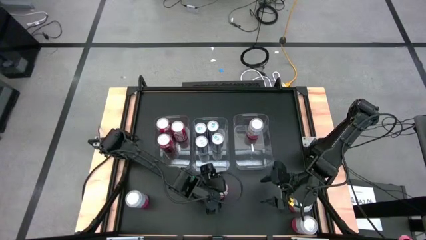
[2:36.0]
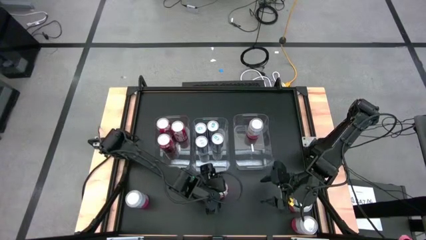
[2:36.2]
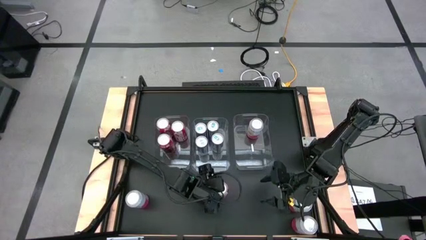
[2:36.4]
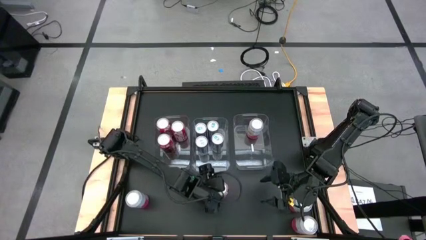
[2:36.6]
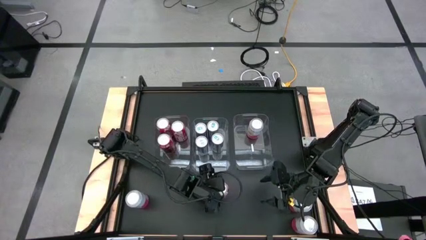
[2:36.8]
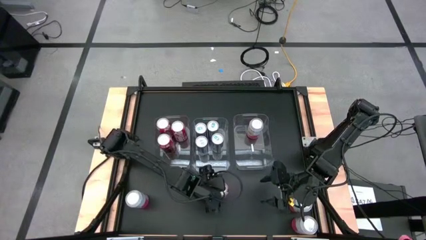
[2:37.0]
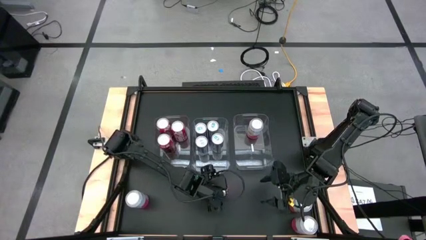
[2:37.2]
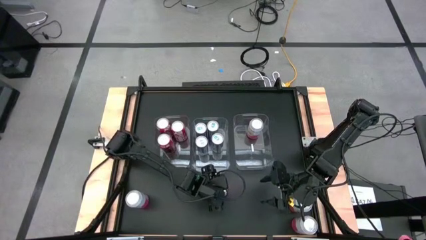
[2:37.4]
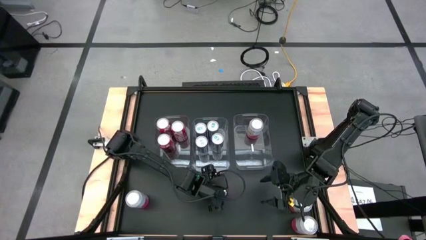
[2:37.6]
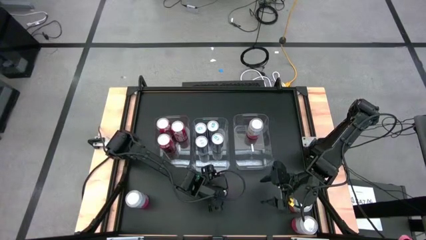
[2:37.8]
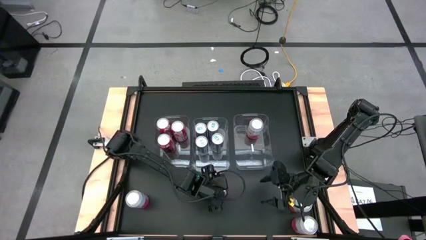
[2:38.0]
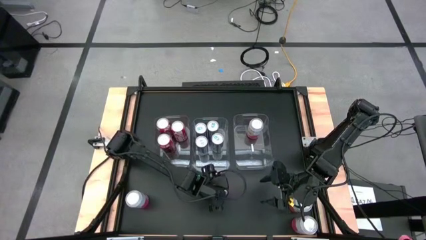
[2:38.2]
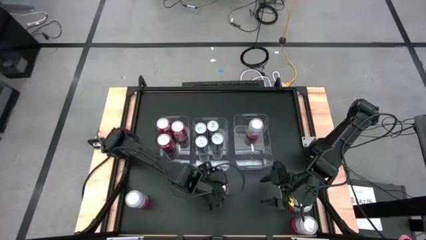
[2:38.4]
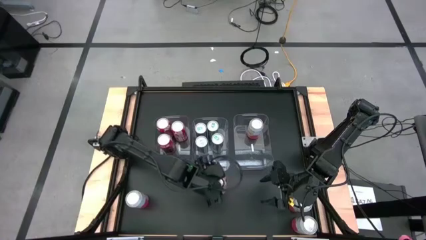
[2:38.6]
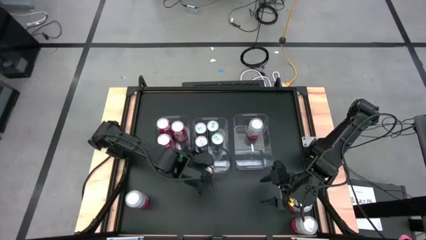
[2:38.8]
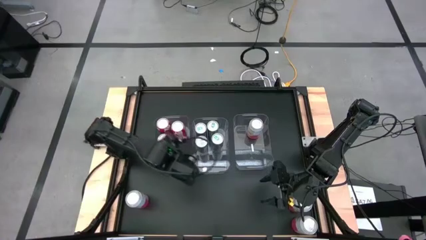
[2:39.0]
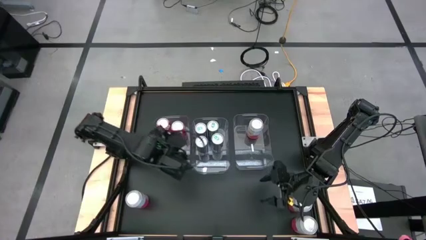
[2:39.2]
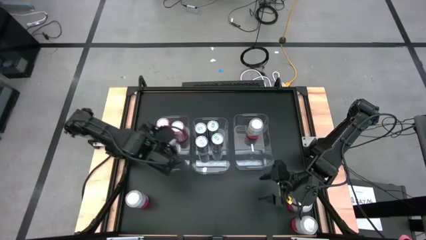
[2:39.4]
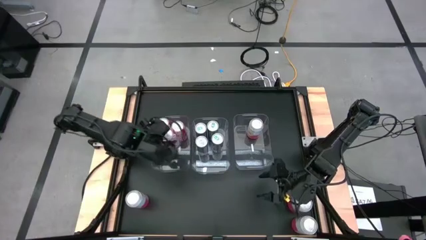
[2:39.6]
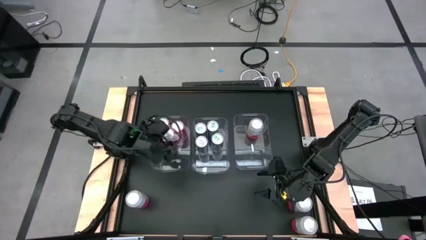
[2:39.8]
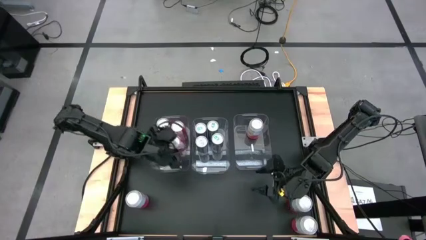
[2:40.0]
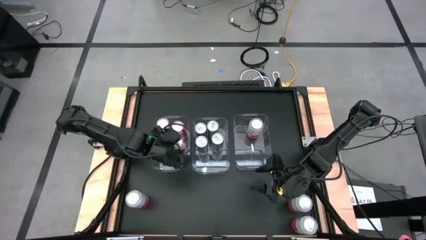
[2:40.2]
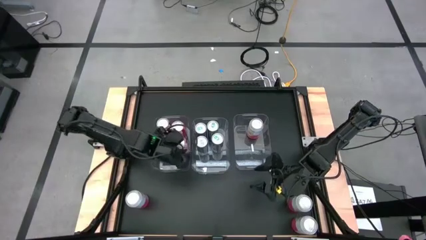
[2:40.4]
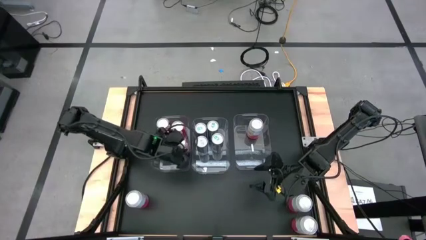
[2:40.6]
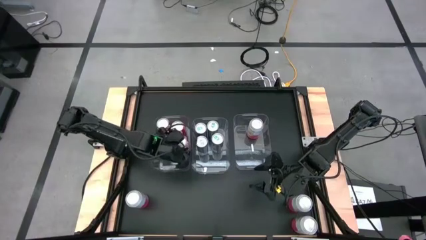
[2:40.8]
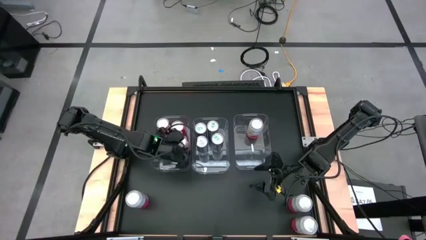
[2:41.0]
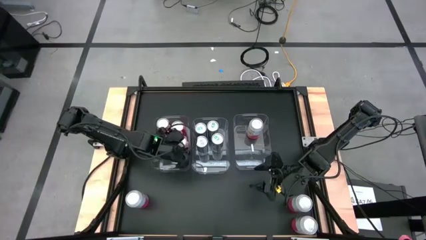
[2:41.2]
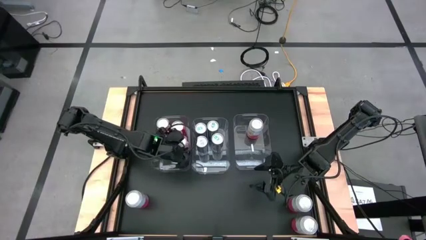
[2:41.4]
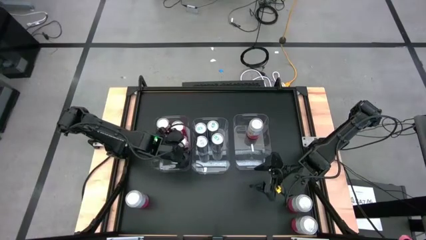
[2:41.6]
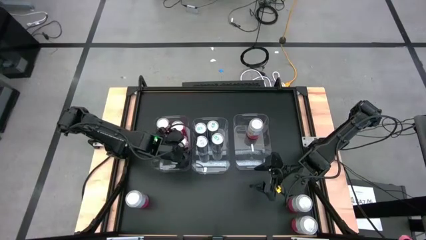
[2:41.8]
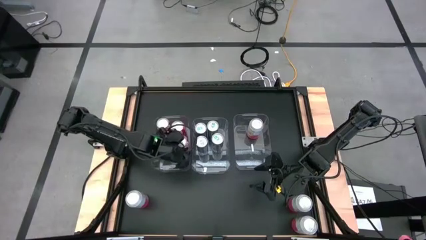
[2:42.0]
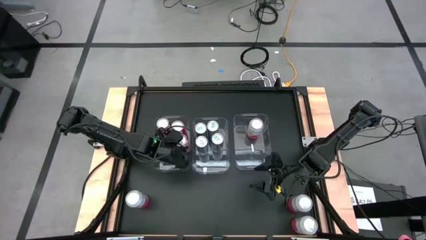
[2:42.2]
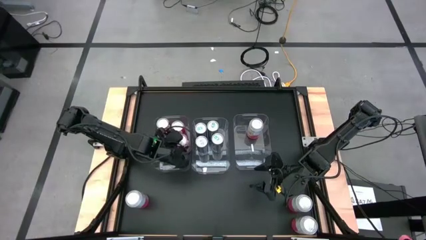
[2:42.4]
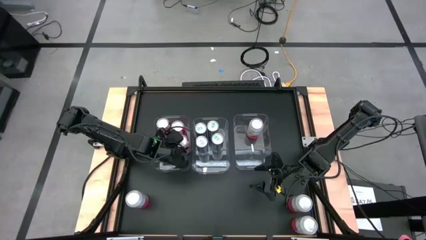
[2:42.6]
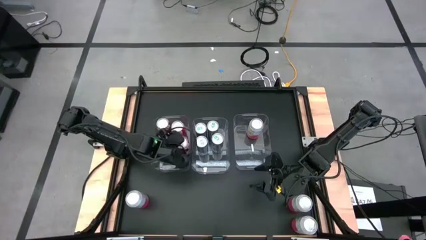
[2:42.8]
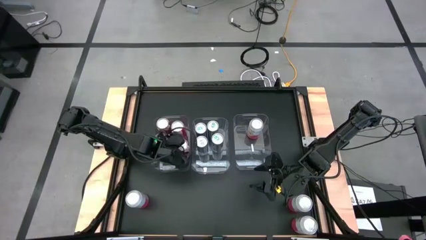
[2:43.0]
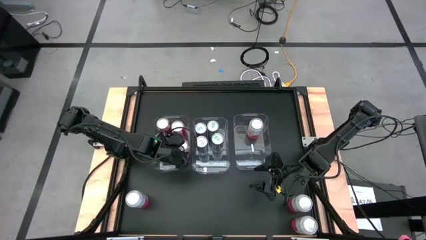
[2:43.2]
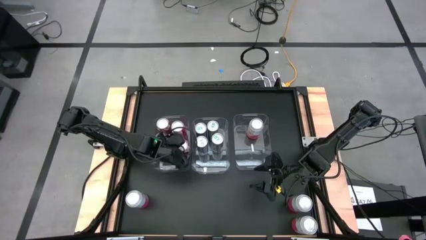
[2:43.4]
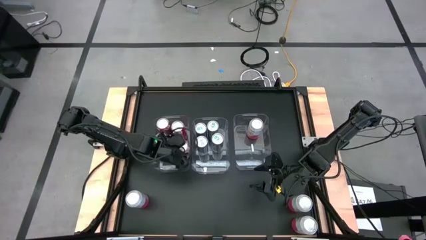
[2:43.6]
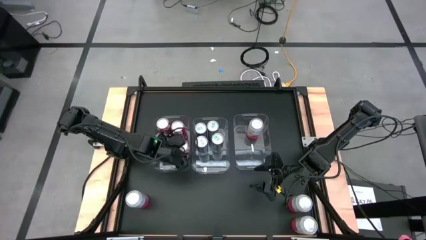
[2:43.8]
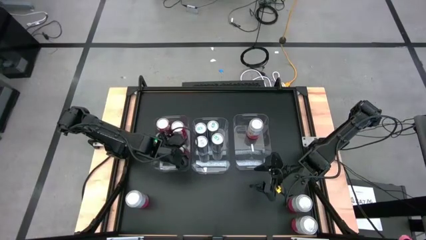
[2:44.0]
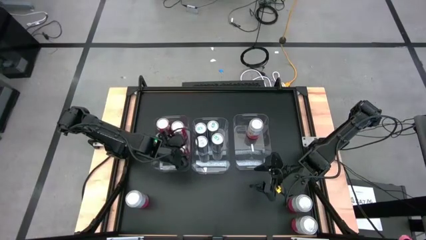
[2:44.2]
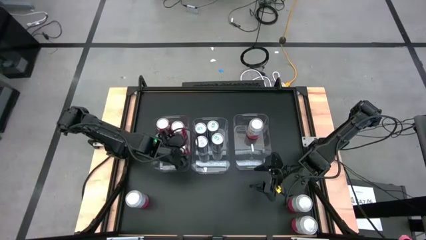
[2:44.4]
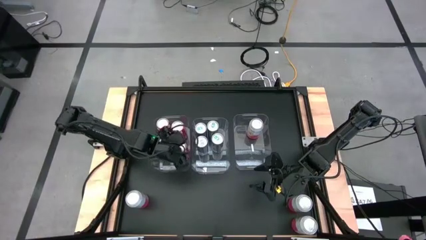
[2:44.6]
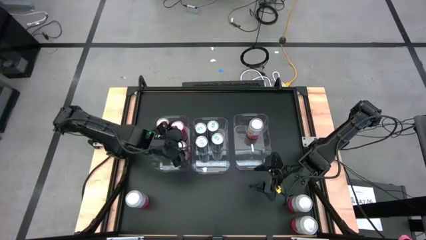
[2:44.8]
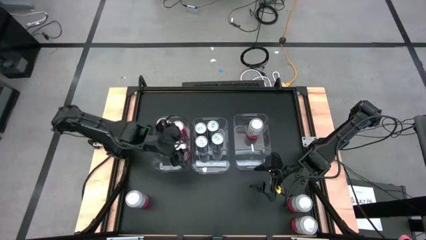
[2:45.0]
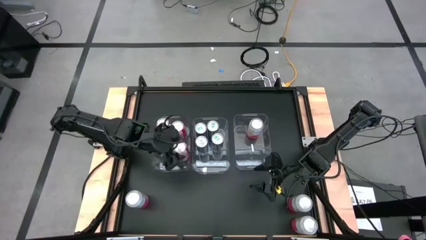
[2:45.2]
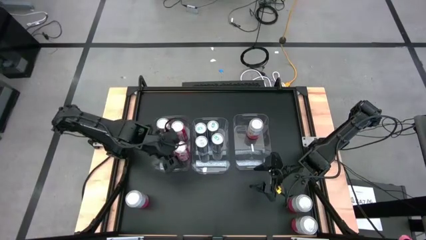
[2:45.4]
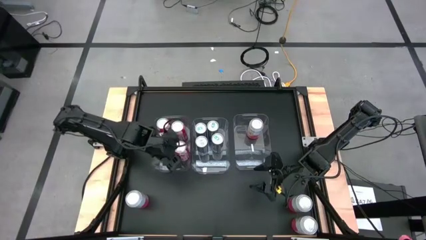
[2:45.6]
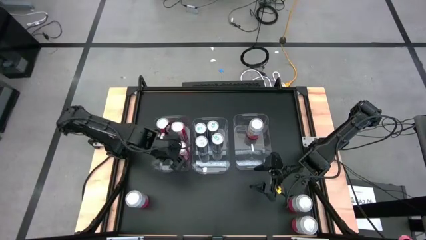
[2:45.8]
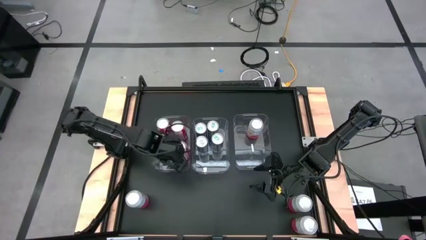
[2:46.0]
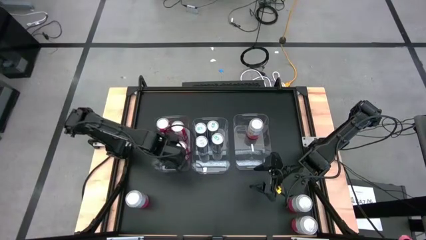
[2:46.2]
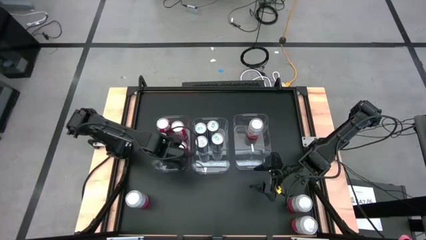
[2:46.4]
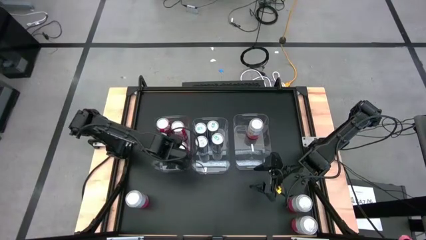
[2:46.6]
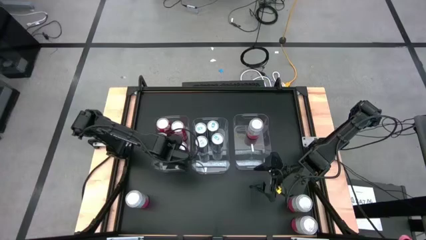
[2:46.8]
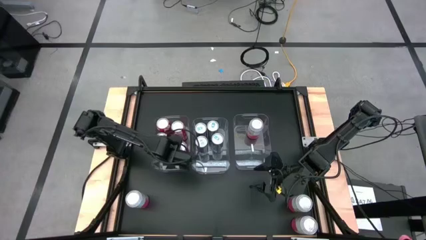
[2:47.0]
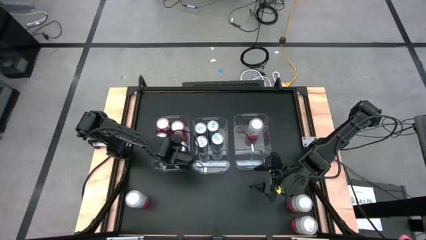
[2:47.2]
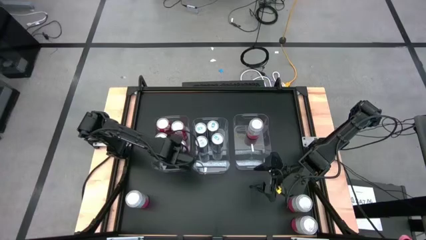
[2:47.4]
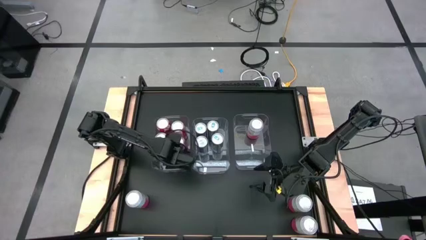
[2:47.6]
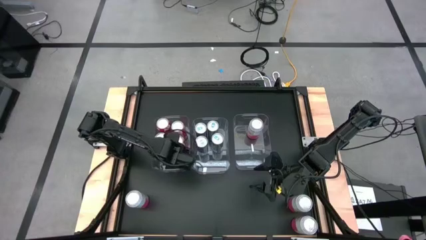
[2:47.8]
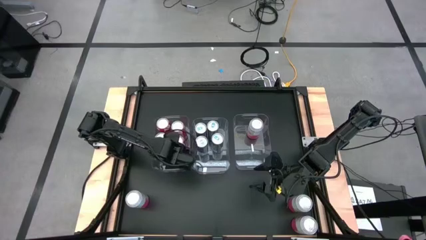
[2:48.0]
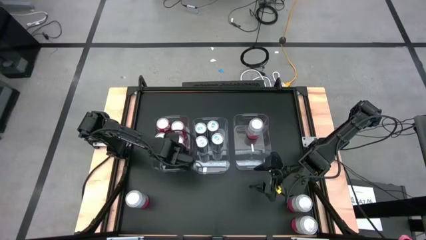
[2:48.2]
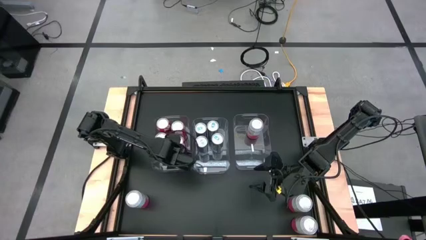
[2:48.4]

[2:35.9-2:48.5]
Task: Sort soda cans
Put the red soda can into the left transparent bin

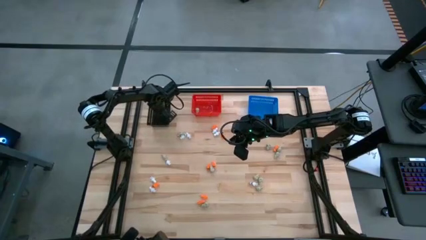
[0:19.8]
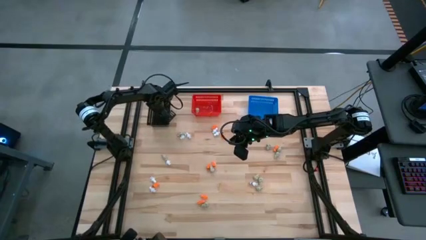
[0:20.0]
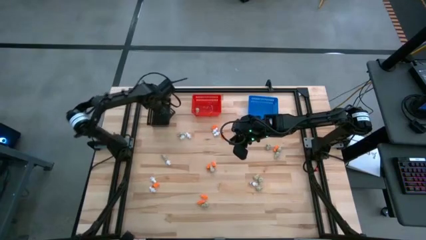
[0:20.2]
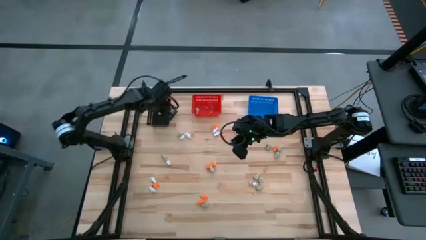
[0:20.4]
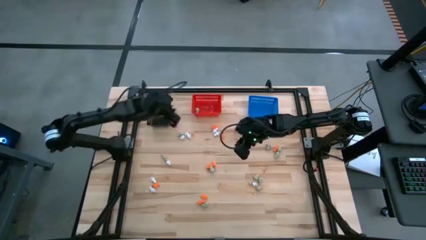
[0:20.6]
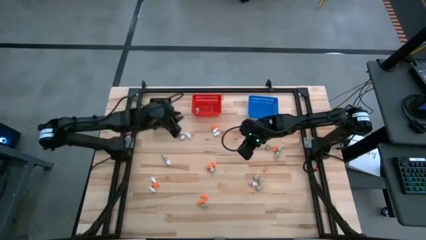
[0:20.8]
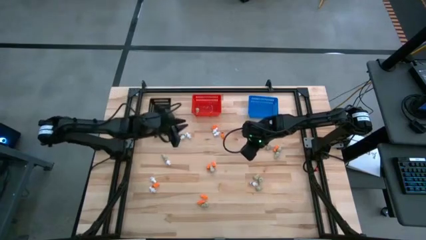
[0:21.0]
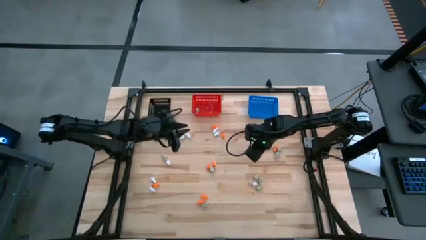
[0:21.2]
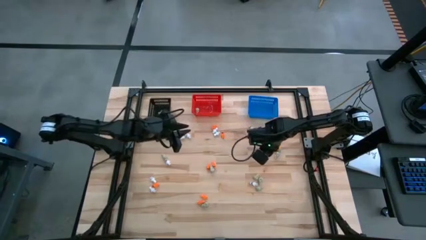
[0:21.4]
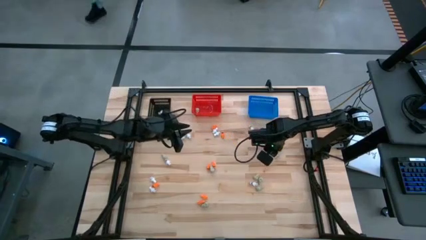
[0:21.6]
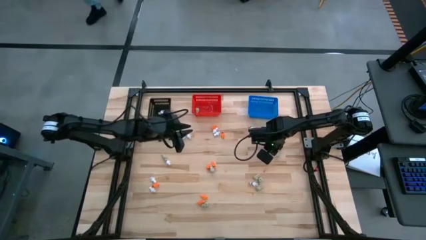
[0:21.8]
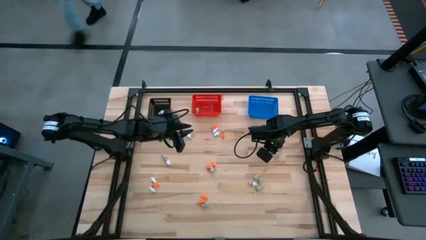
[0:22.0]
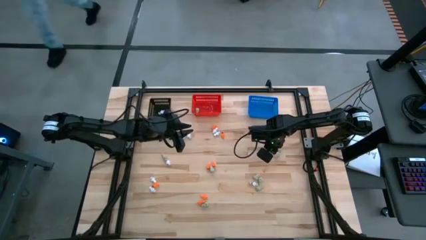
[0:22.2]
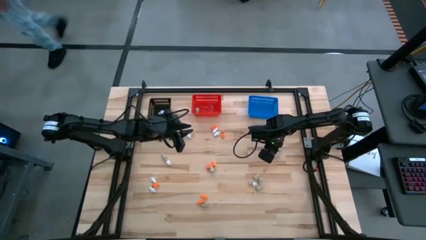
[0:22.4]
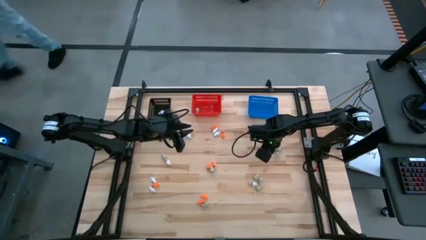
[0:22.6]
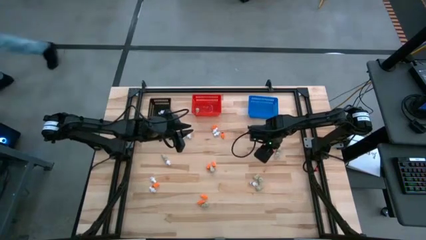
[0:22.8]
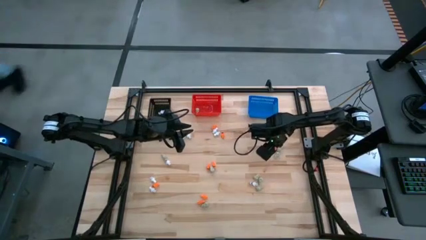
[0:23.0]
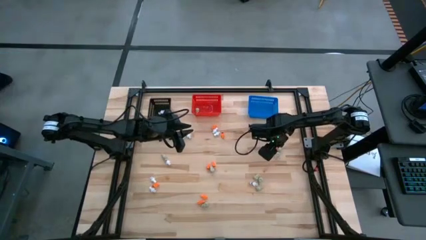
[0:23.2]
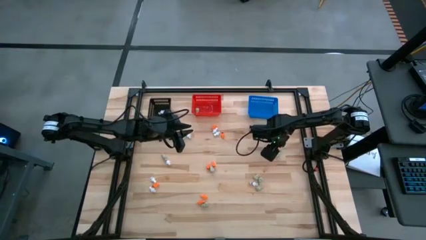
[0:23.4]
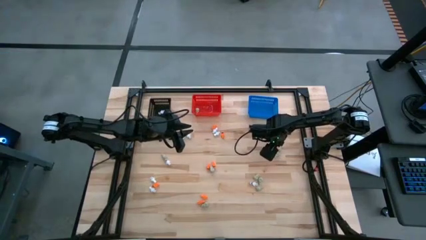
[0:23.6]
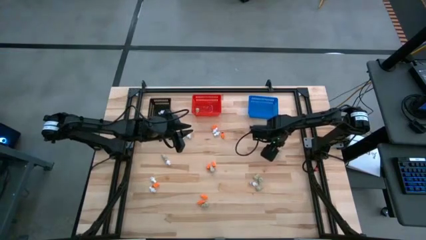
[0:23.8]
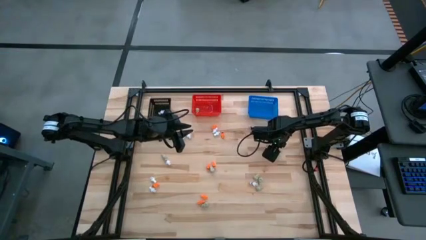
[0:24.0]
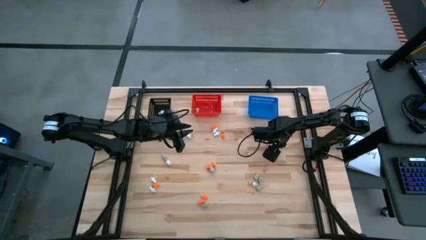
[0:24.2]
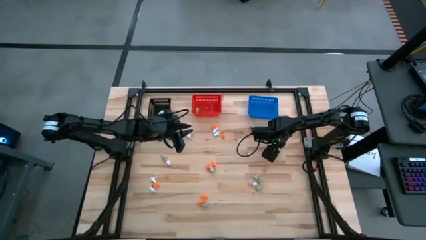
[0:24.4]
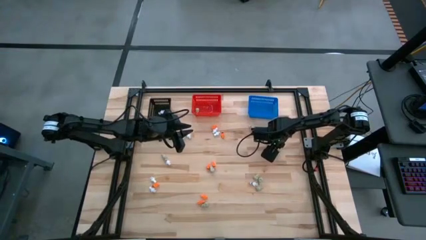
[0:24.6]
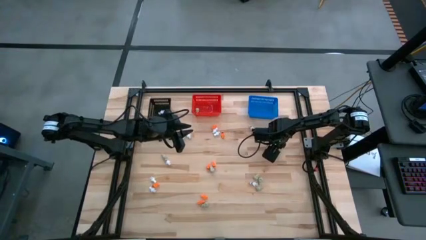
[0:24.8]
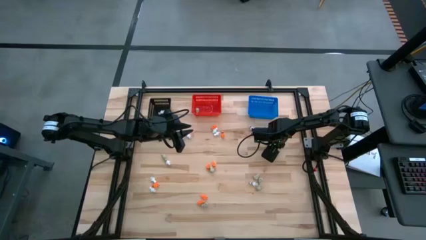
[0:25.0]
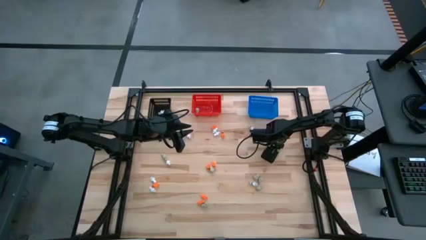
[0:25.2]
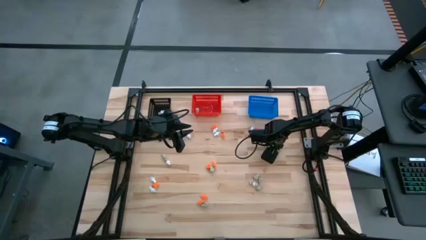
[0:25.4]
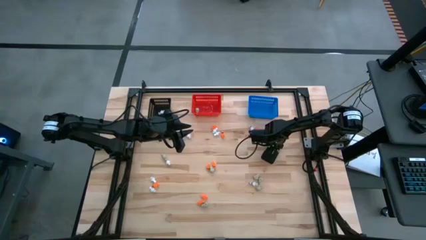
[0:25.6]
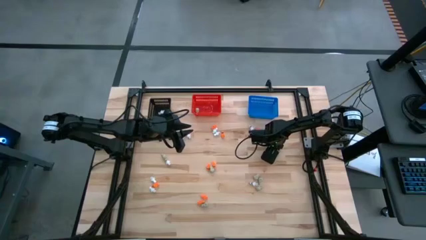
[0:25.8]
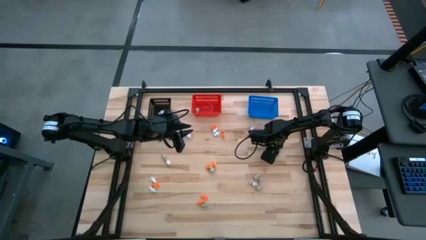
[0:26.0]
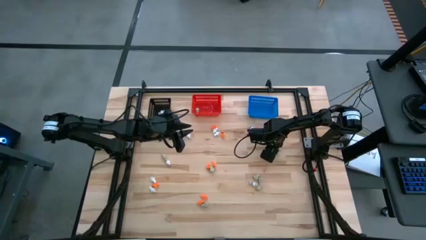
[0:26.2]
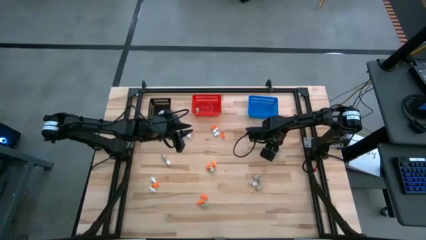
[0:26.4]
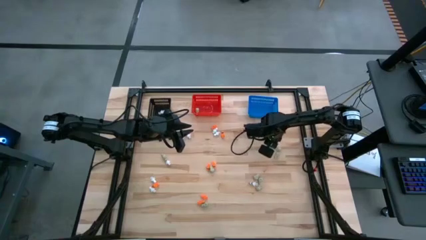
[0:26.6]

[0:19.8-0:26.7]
Task: Sort Halloween decoration
Put the orange skeleton toy into the blue bin
